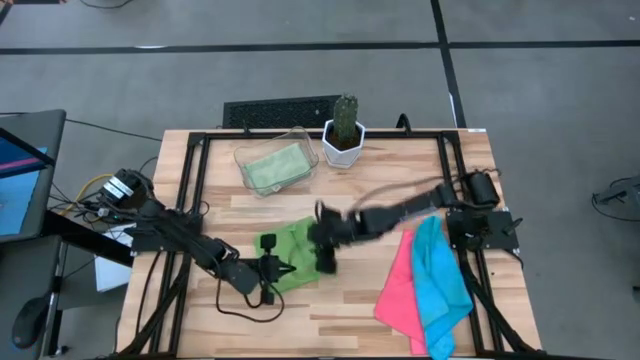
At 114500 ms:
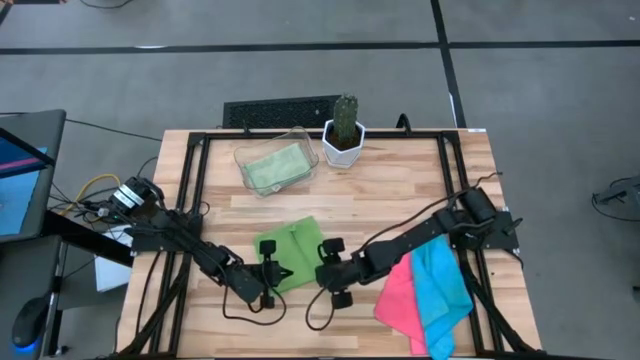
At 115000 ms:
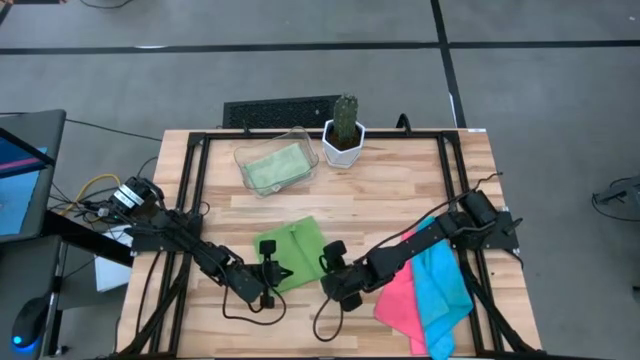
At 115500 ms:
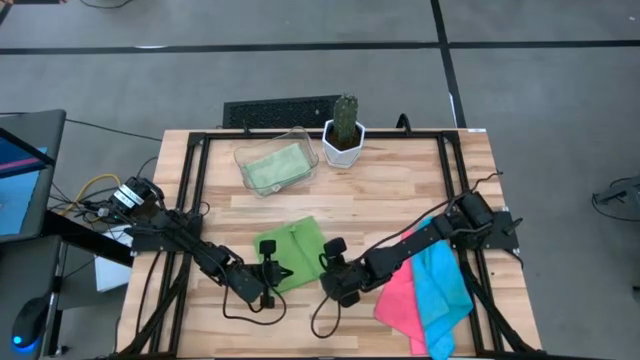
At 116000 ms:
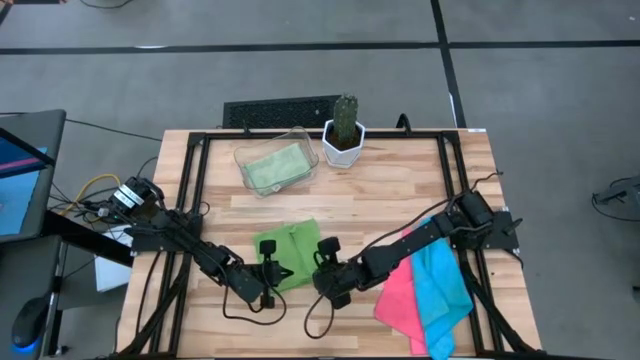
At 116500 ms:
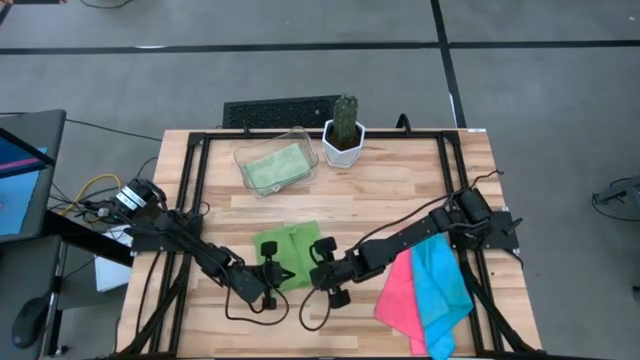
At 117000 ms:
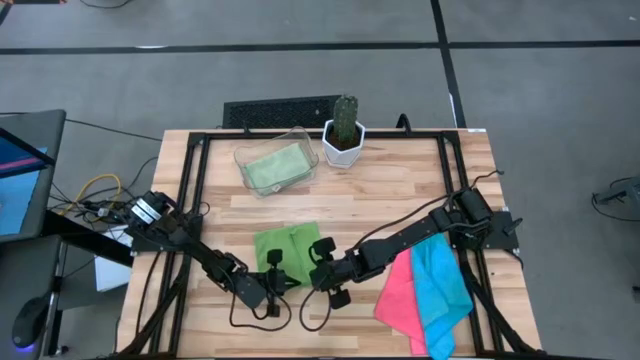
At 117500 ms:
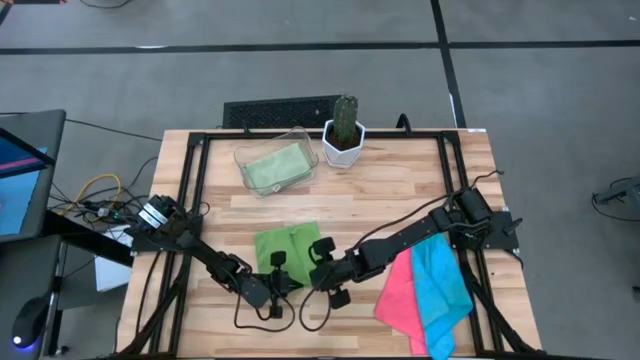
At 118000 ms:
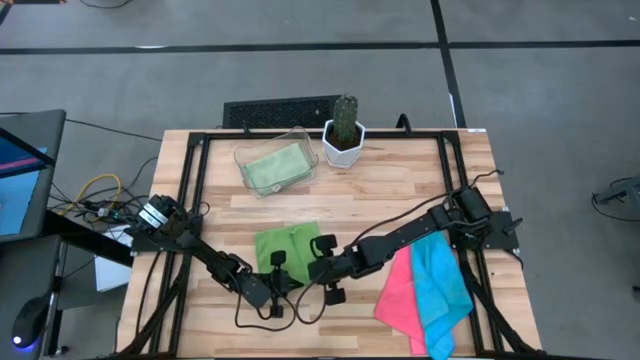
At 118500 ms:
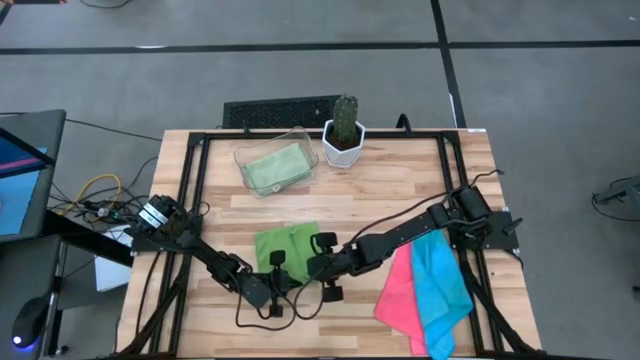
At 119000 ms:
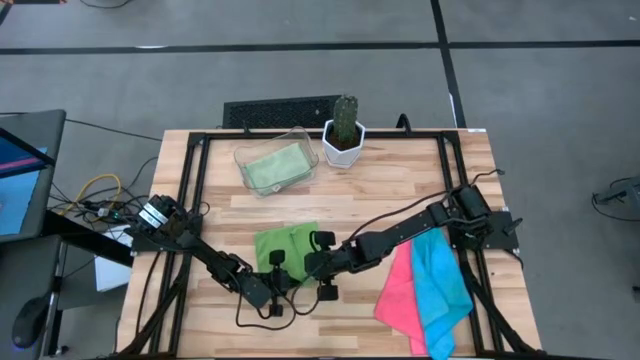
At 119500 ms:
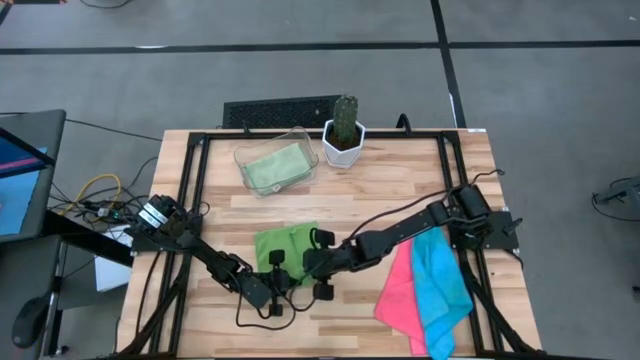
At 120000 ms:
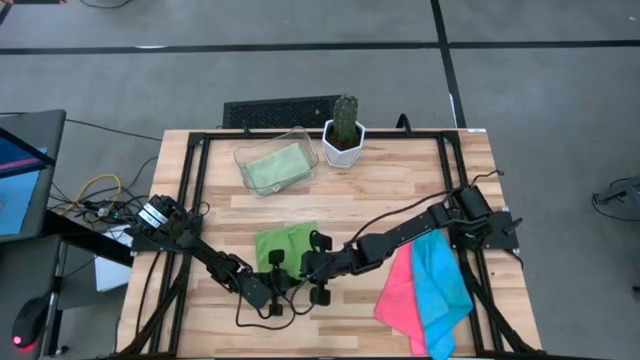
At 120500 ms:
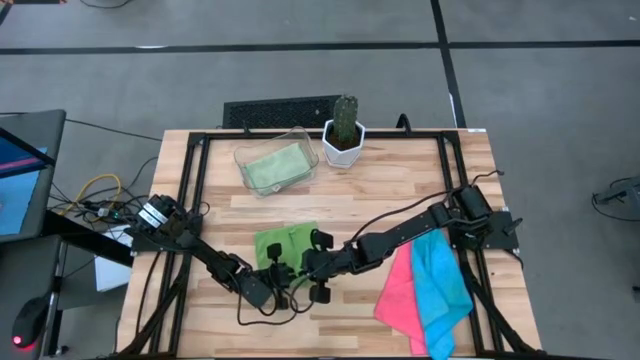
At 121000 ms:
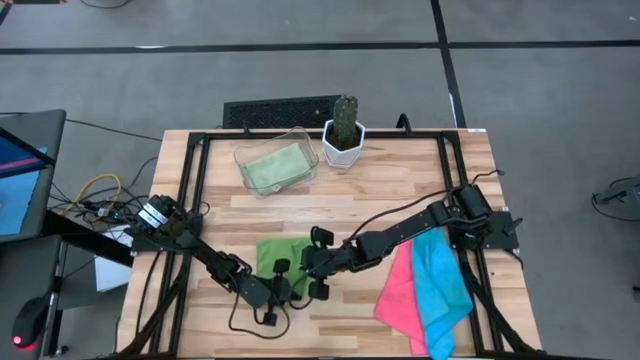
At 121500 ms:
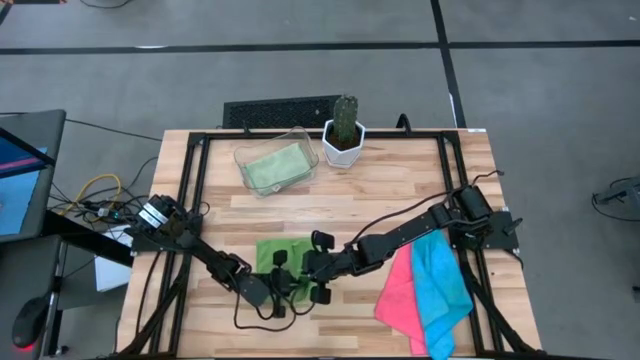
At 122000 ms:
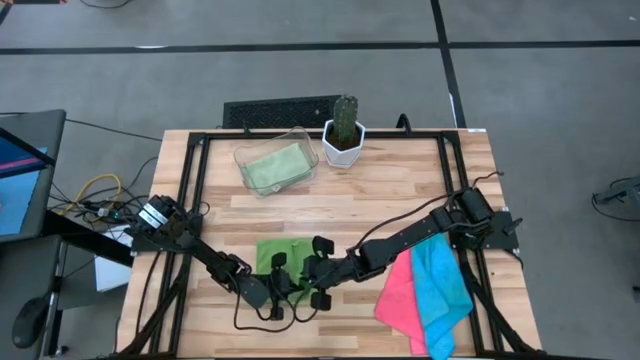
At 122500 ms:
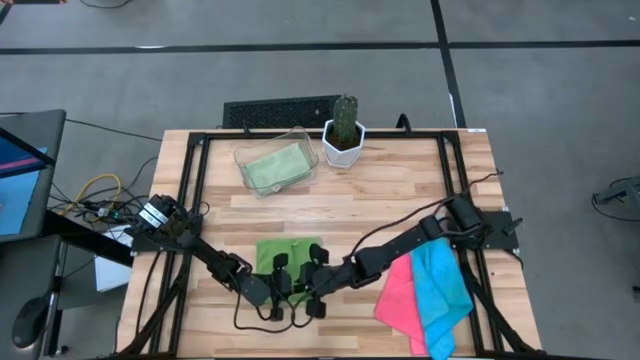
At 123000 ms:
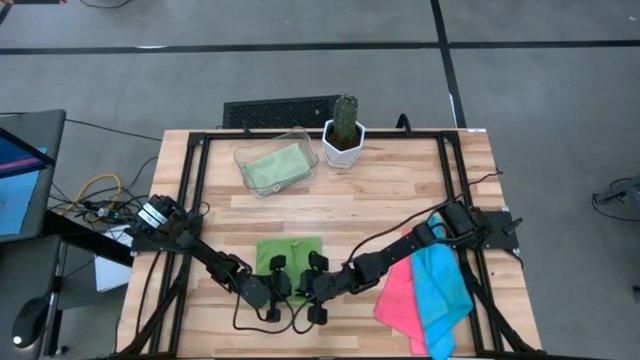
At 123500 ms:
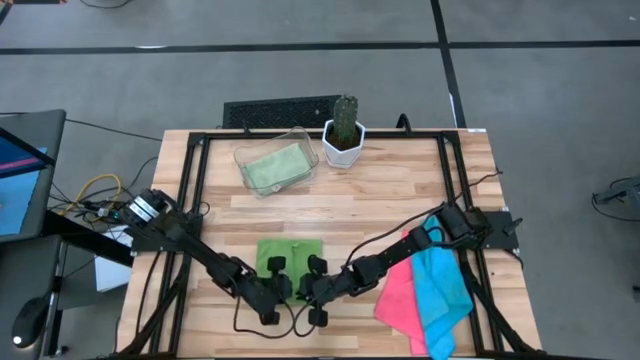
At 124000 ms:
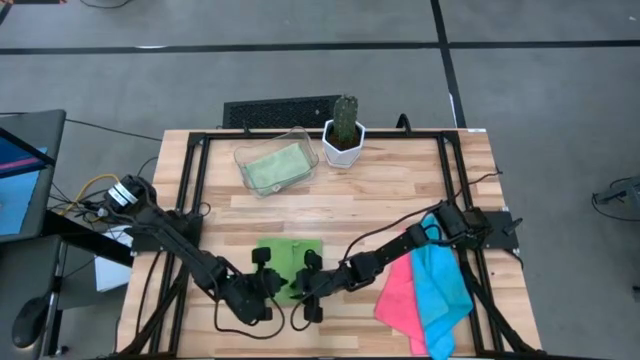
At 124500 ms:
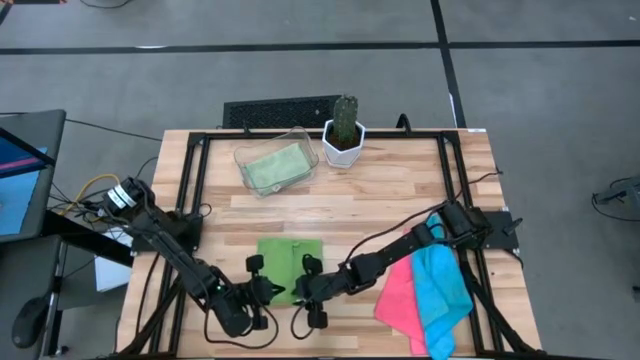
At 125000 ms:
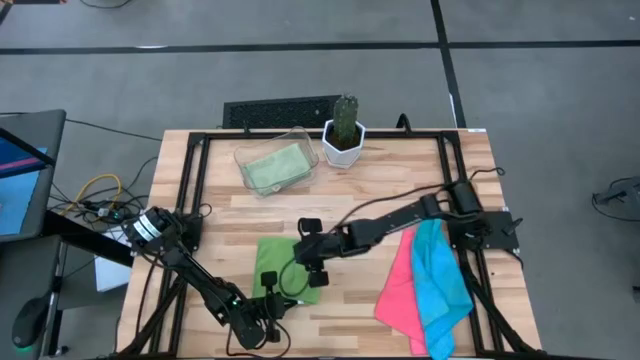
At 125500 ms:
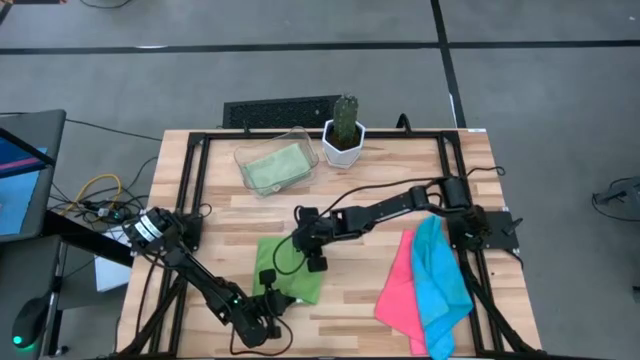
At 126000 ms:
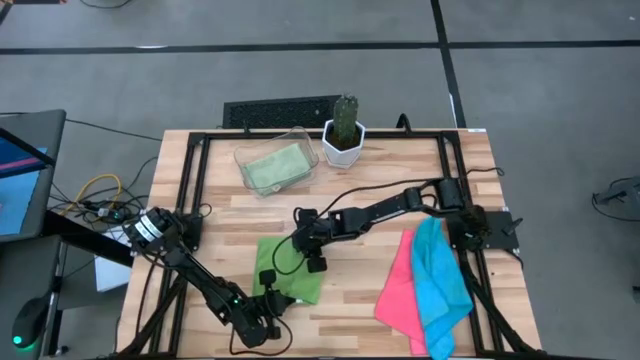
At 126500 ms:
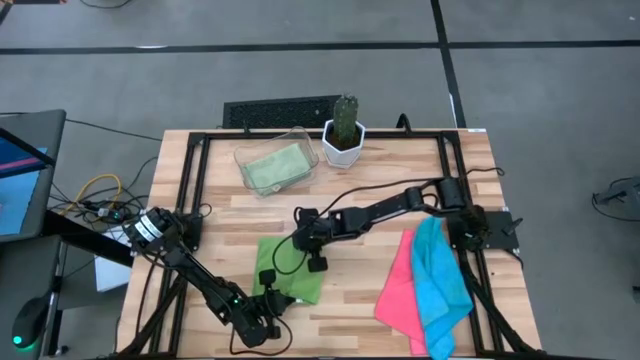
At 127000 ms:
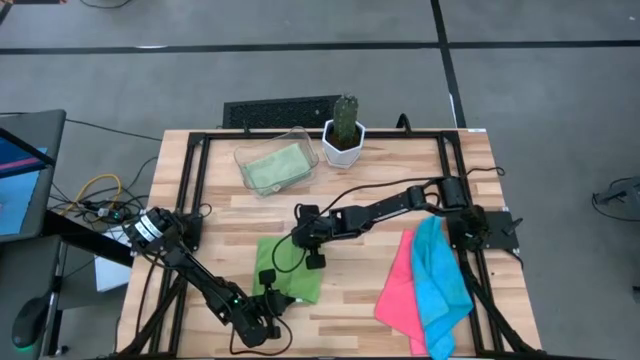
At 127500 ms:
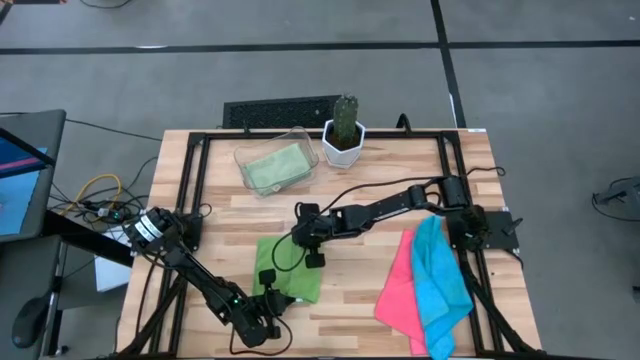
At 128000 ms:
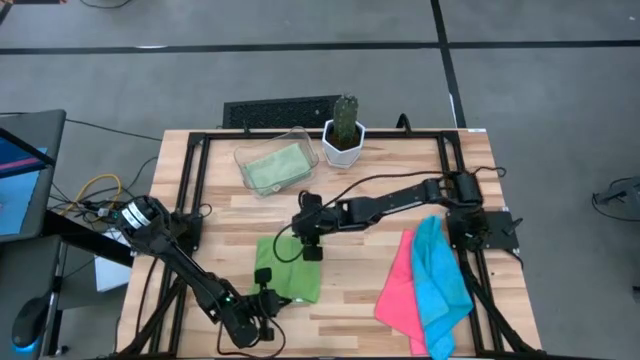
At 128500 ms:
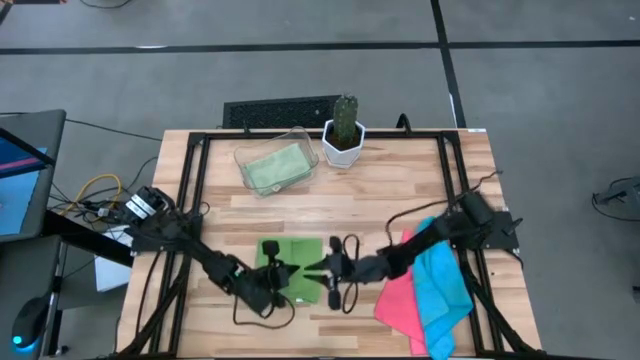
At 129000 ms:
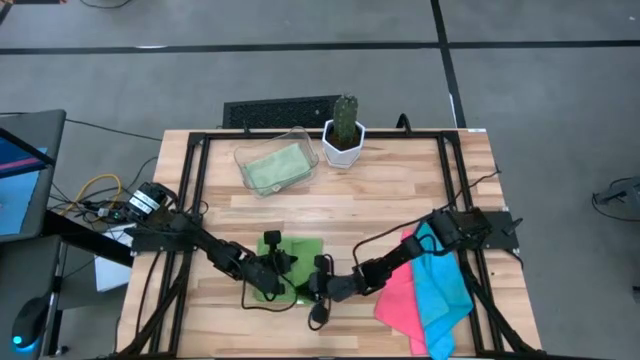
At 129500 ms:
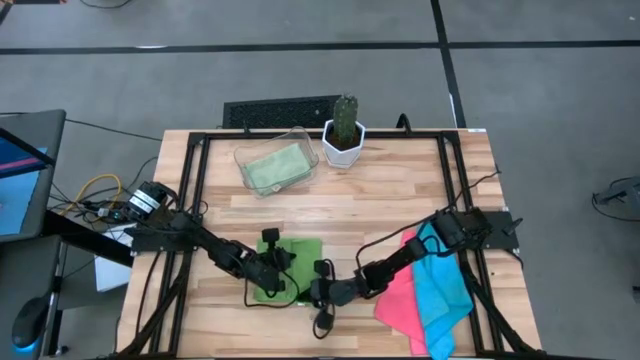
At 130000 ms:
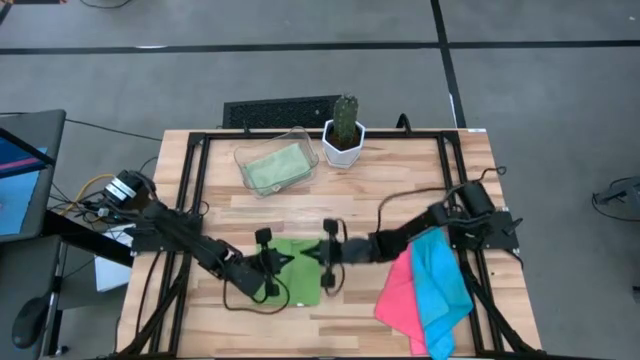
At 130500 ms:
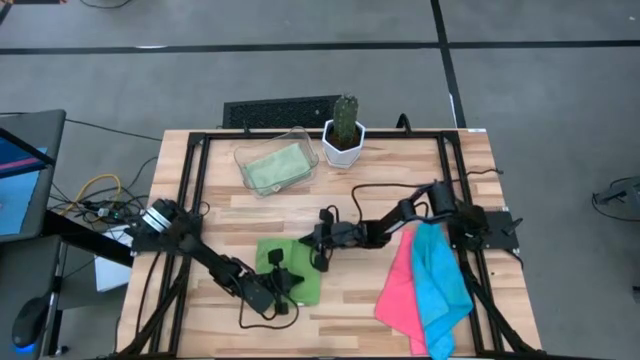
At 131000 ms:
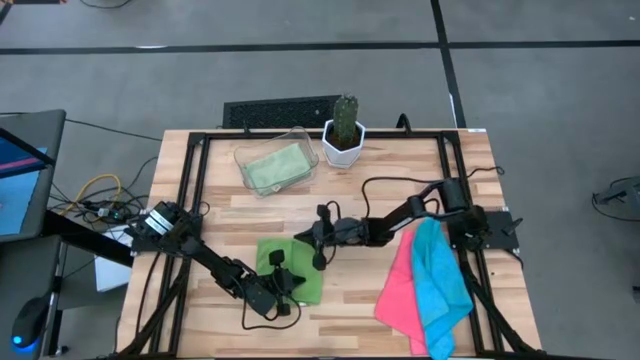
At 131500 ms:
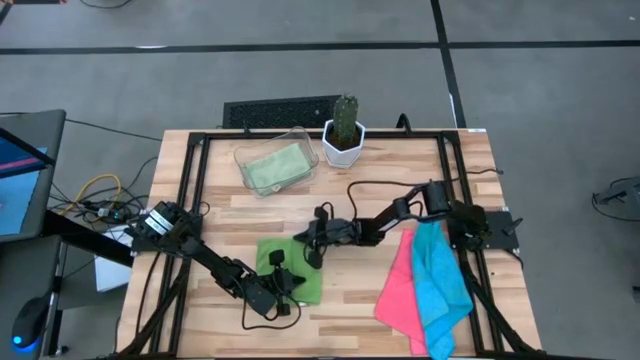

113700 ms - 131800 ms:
Task: Fold microfiber towels
Fold the green microfiber towel

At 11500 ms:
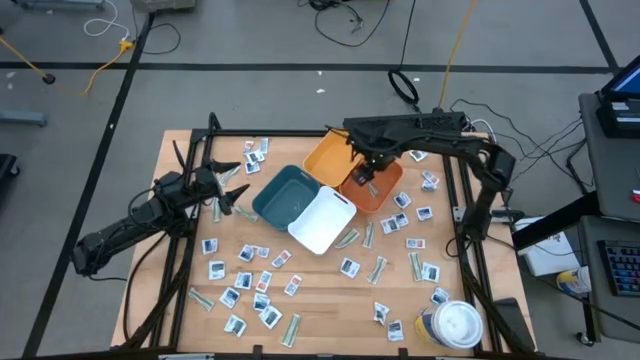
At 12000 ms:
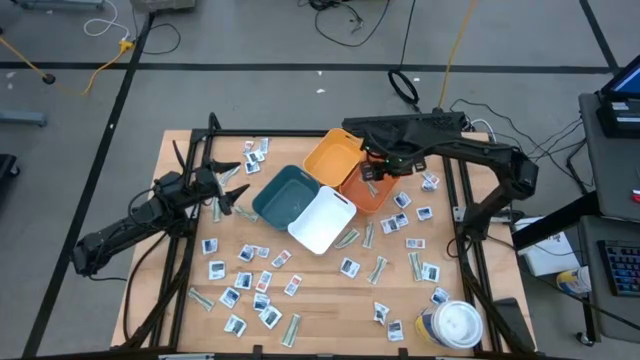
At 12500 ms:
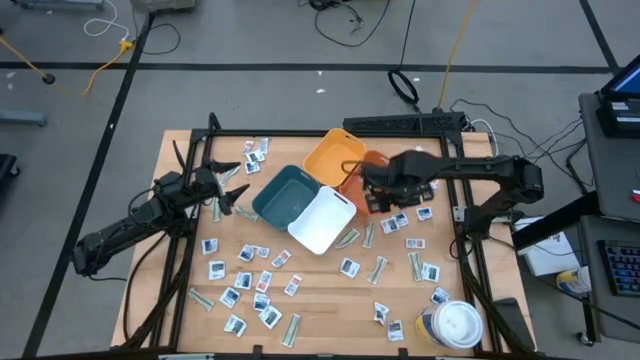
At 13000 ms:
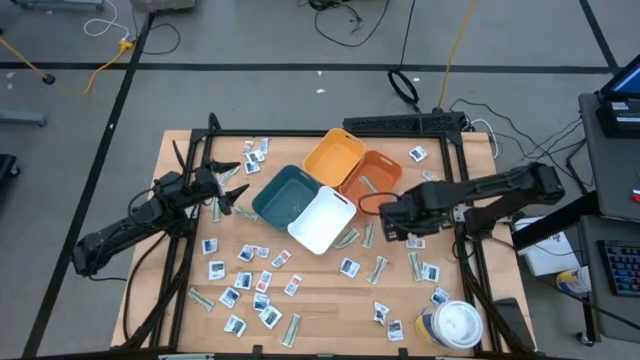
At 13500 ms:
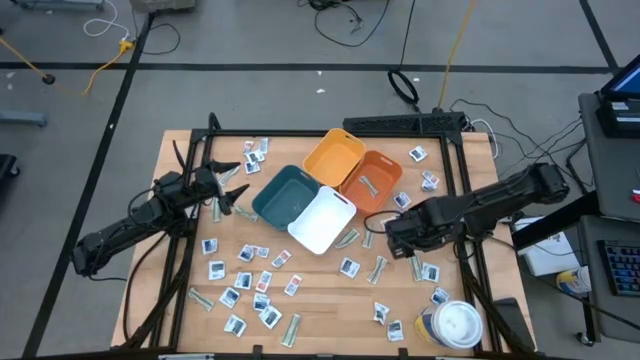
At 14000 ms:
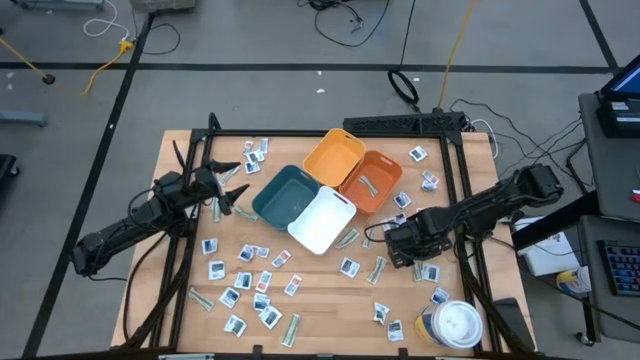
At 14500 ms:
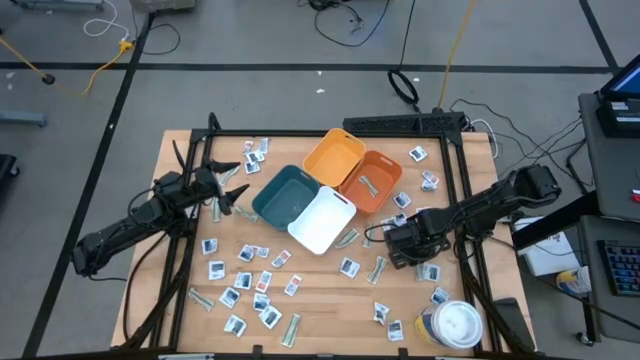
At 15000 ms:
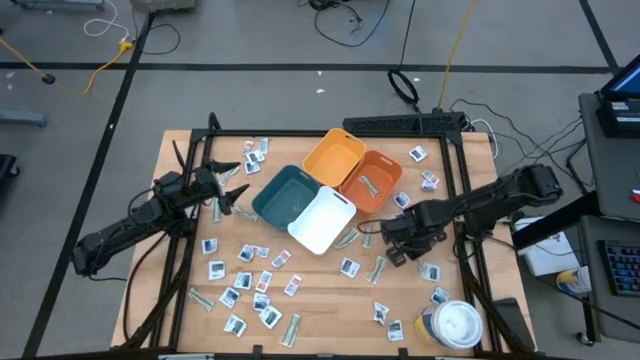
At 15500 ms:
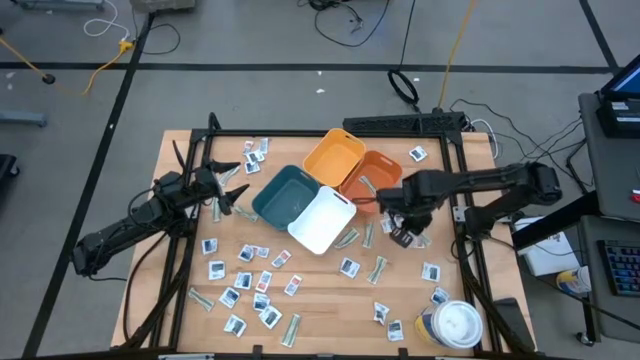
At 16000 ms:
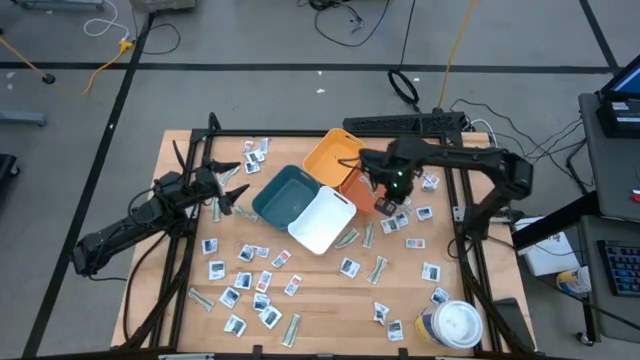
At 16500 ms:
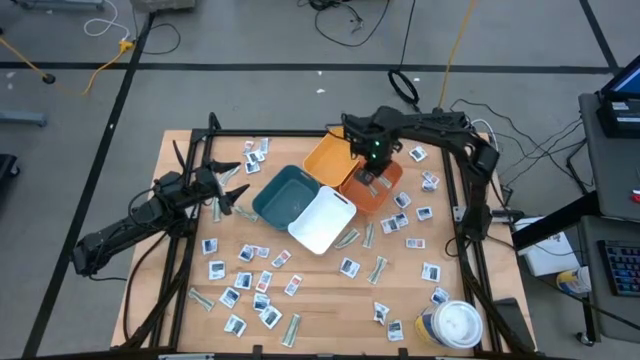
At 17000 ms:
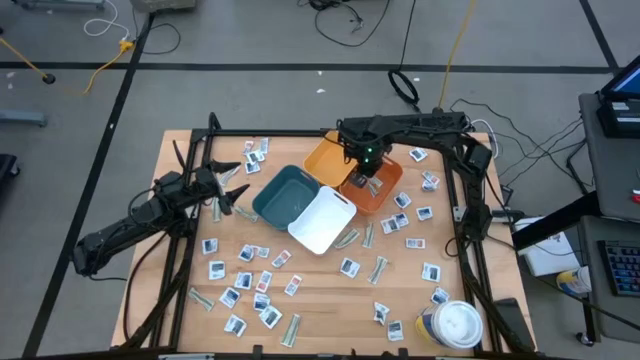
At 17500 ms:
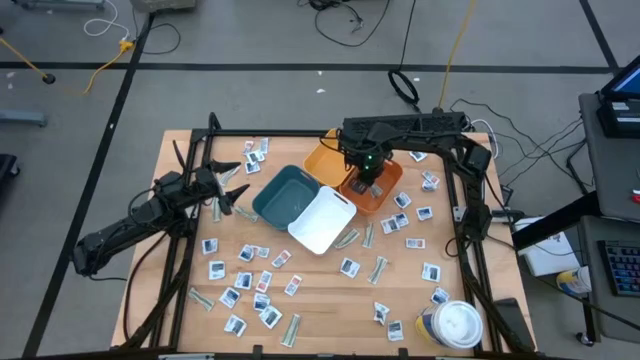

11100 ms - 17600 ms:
Task: Pick & Place First Aid Supplies
Put the green bandage pack into the orange bin
